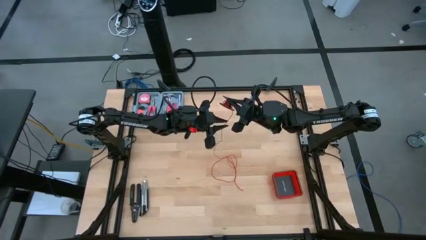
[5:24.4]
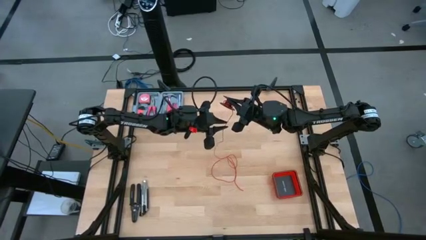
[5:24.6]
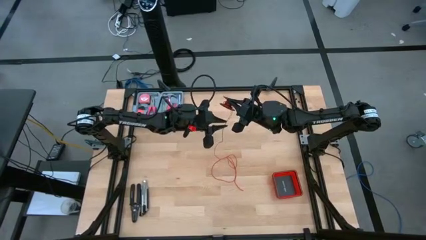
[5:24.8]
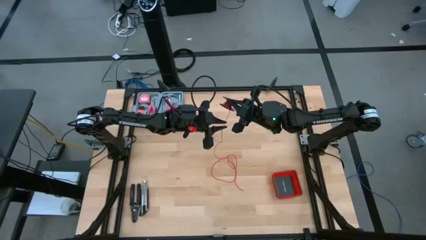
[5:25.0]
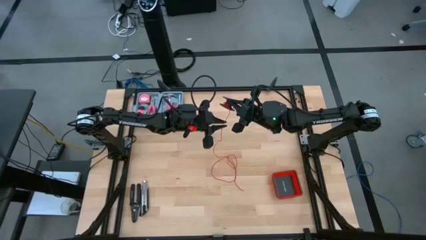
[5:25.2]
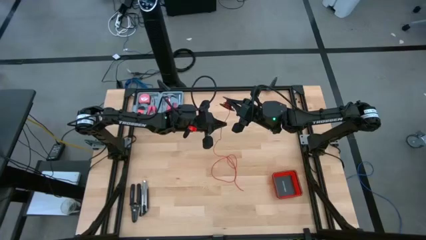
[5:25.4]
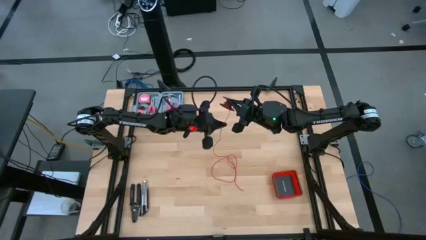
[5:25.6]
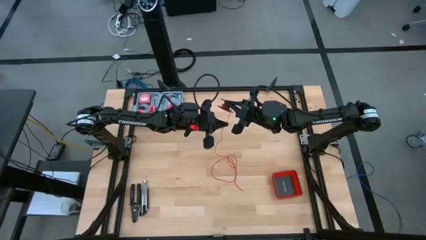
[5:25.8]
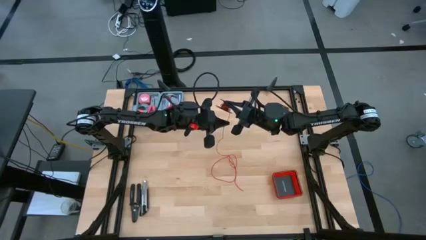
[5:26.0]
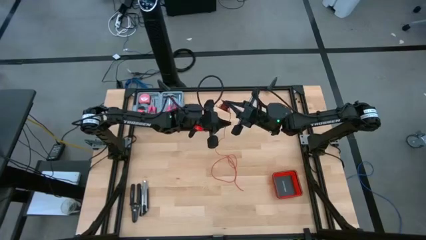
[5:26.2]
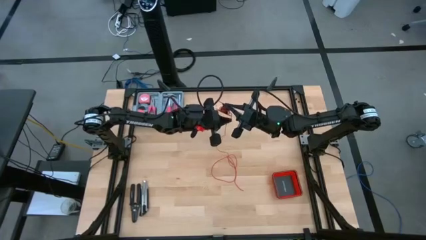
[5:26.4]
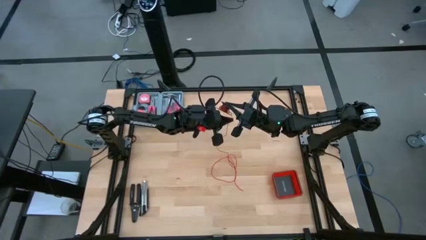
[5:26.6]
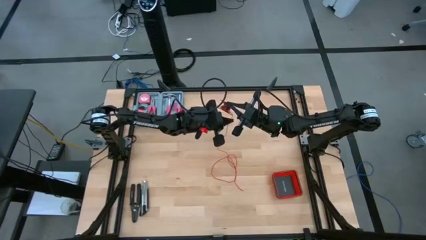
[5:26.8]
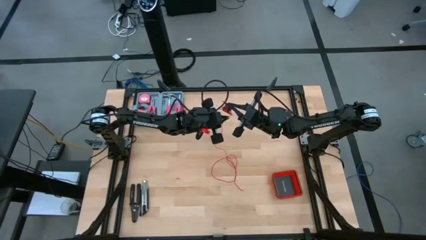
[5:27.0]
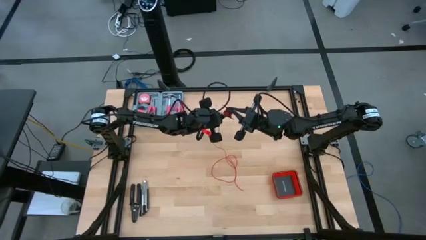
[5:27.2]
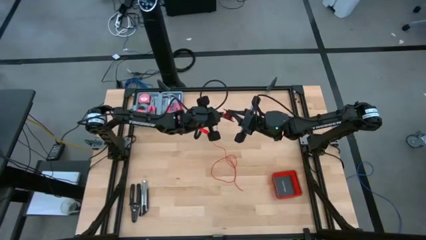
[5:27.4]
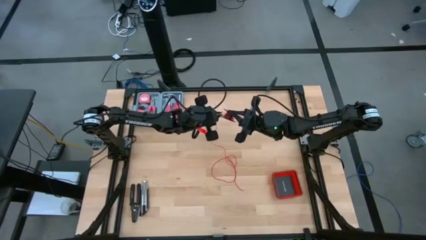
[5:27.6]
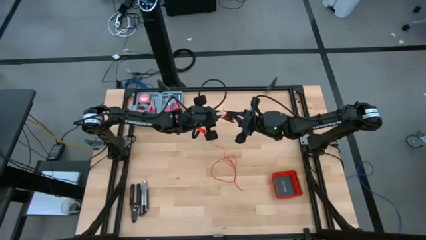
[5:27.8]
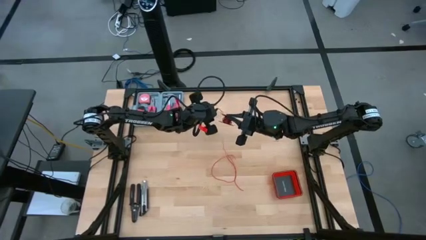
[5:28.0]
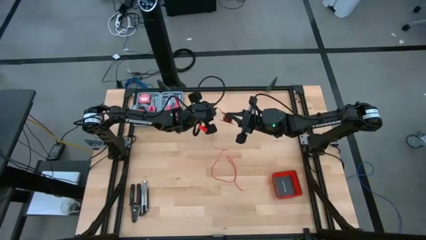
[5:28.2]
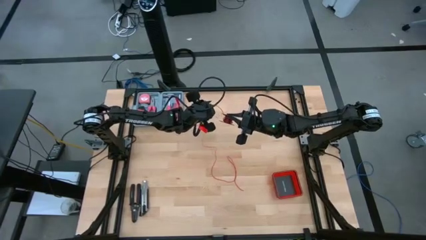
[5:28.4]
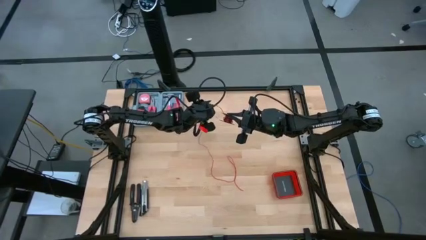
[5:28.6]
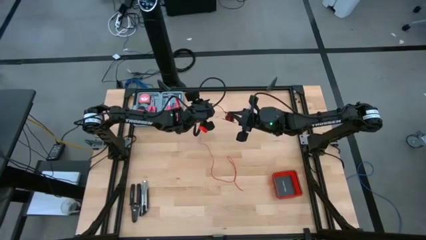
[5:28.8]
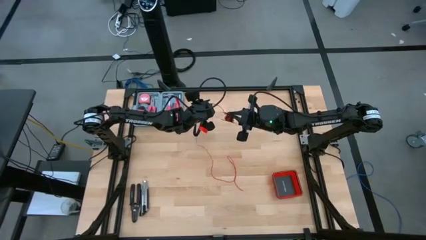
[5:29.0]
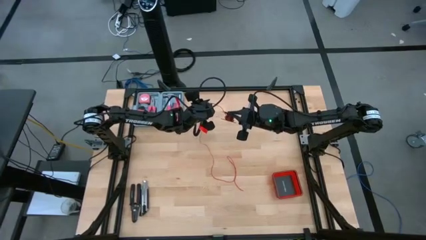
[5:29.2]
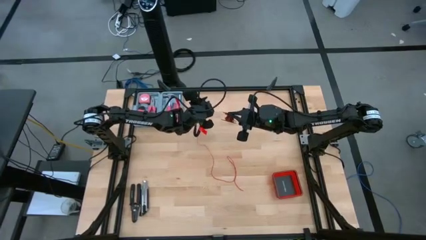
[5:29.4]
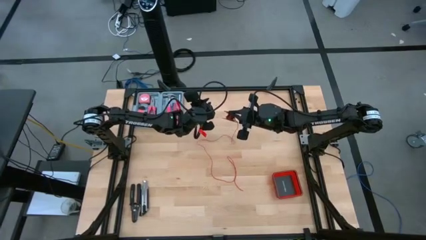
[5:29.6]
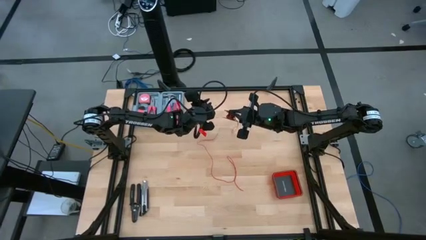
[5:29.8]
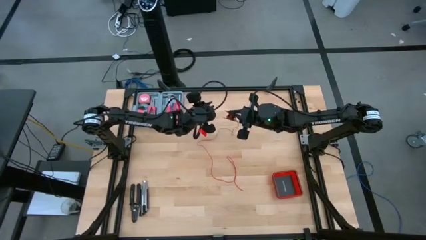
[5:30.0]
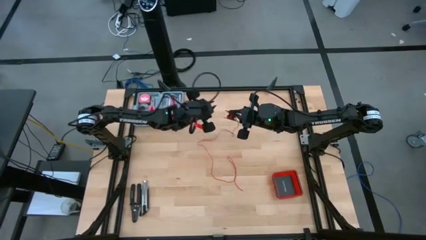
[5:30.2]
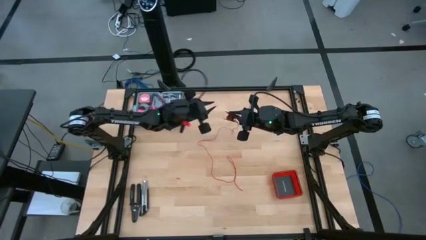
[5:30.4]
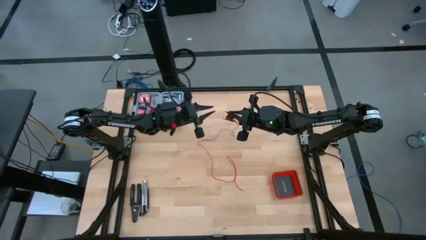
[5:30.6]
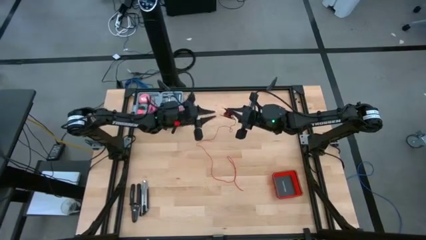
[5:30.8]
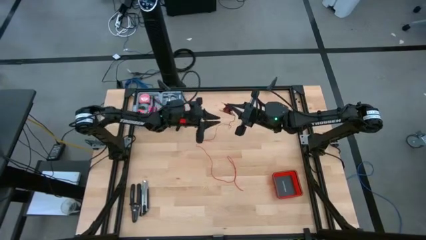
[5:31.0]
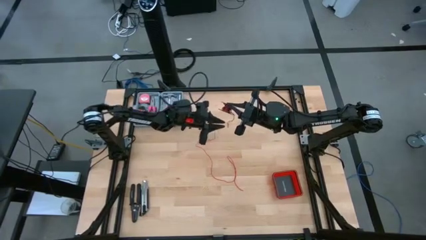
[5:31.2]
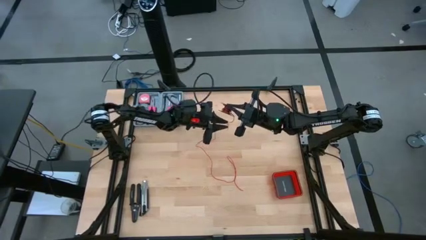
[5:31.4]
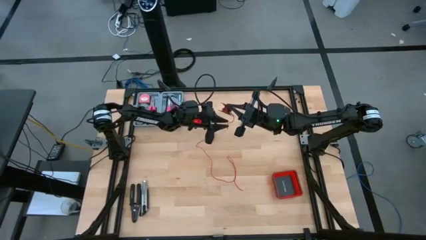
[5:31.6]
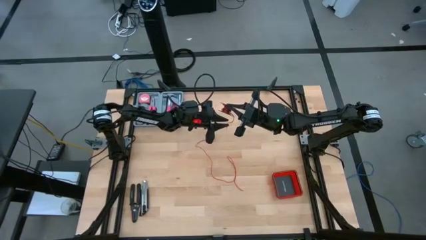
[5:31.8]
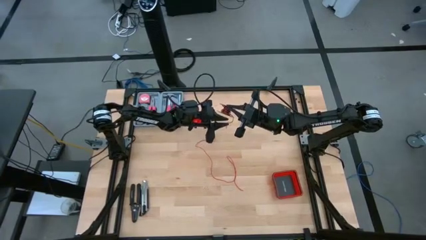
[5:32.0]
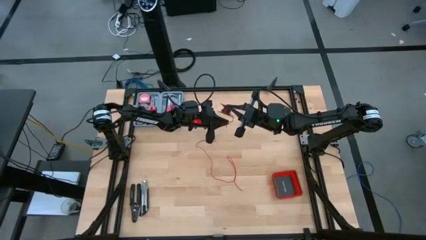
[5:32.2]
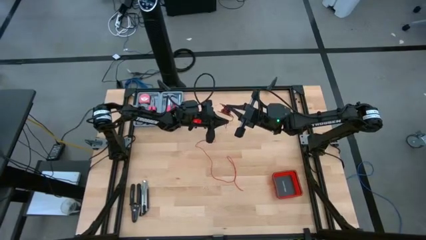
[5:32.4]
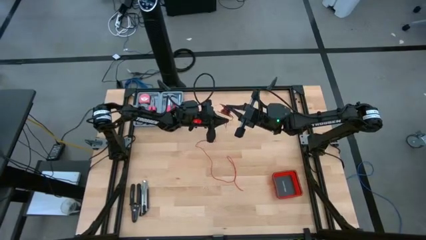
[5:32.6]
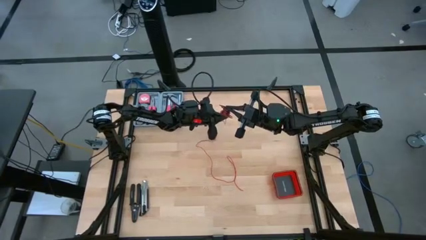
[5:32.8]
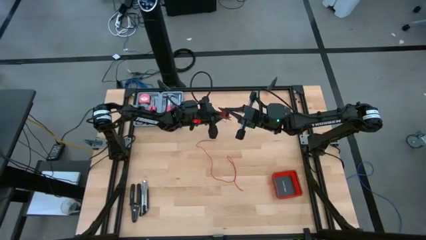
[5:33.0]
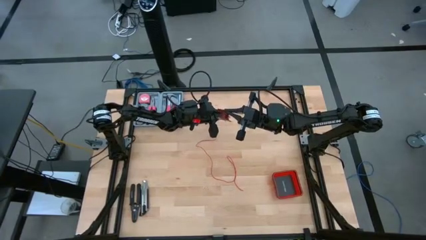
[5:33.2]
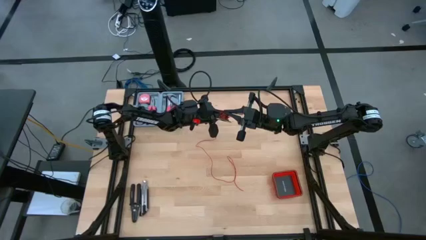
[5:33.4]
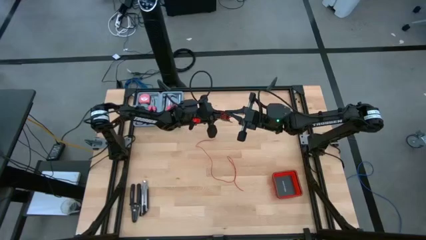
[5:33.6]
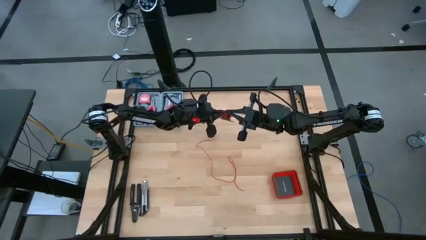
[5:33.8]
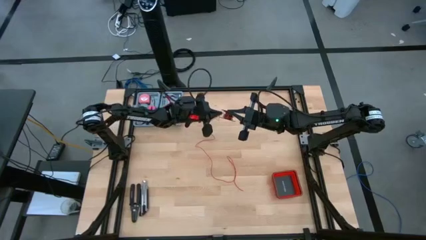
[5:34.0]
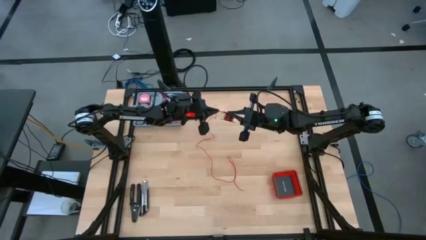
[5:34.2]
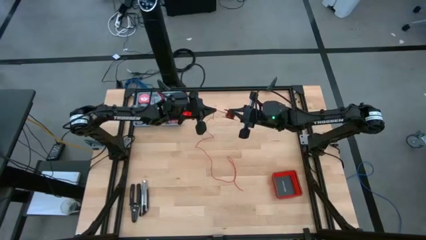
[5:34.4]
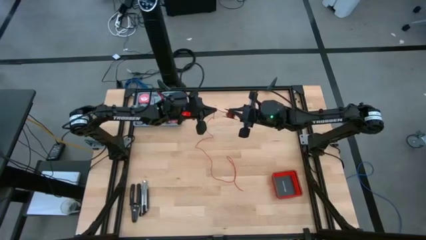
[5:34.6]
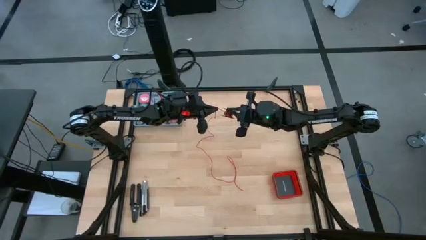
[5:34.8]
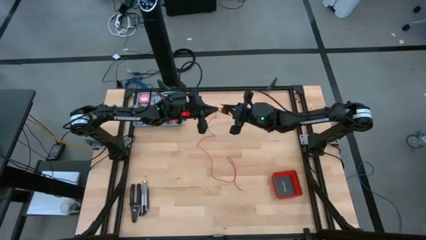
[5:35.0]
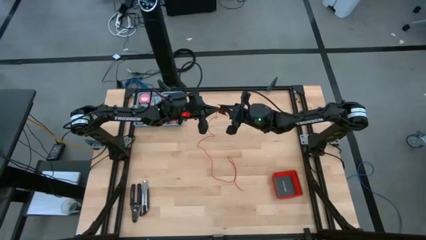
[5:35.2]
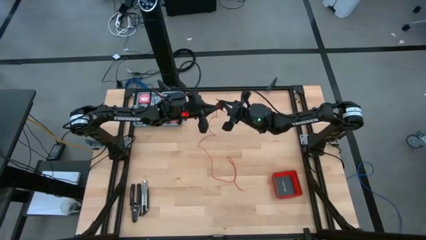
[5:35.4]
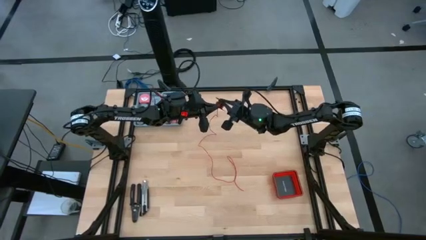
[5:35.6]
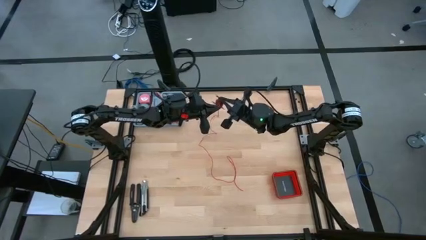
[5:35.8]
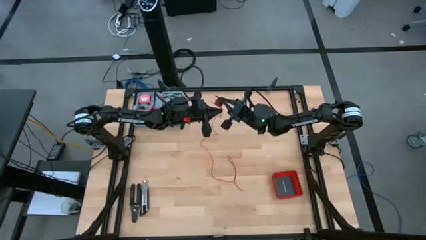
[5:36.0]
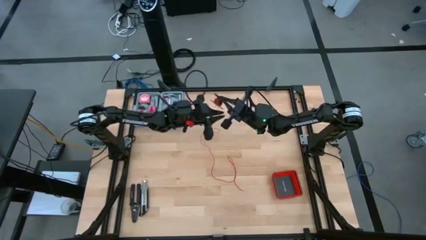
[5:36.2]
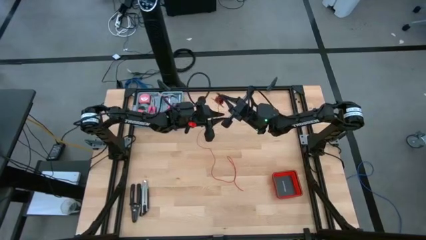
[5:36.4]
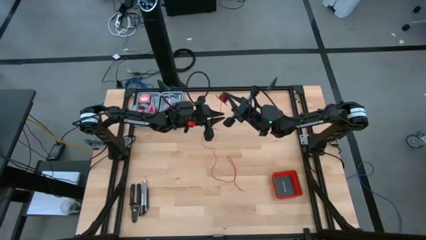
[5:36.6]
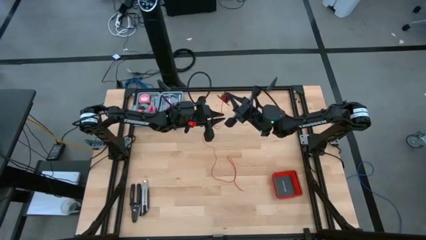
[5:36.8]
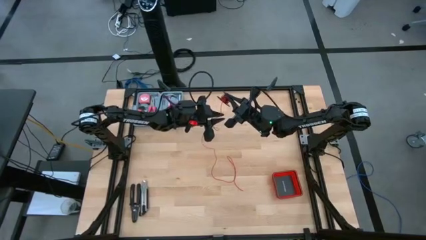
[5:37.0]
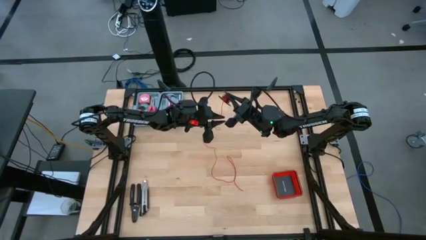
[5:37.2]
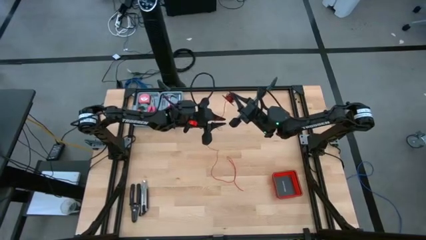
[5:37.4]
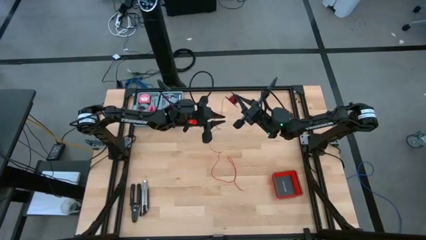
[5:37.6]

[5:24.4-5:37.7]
Task: Coil cords
Coil the red wire onto the spool

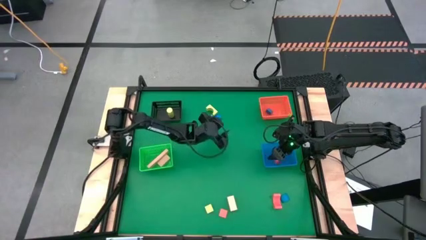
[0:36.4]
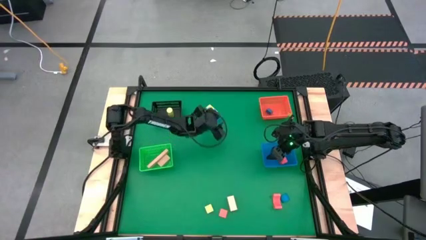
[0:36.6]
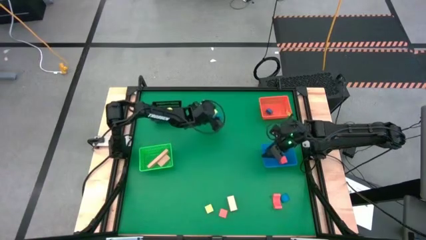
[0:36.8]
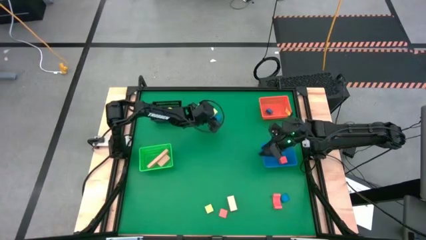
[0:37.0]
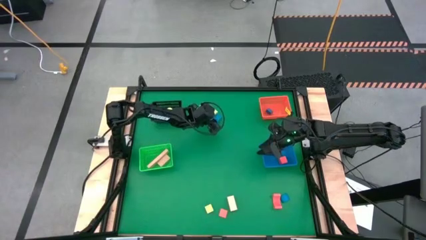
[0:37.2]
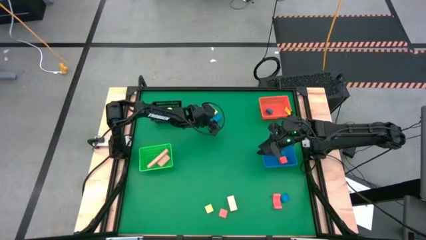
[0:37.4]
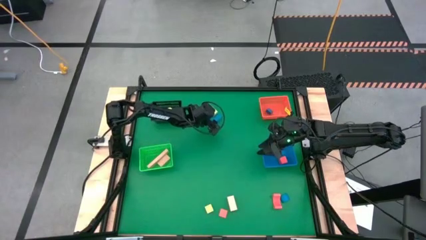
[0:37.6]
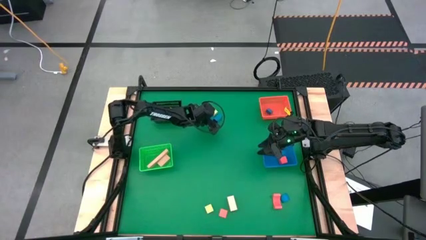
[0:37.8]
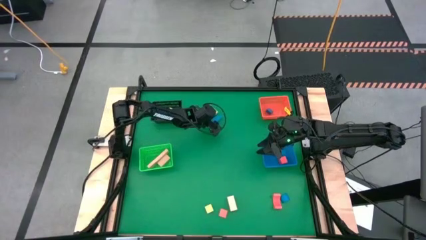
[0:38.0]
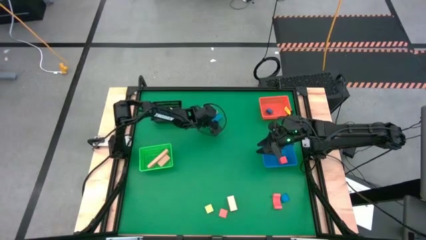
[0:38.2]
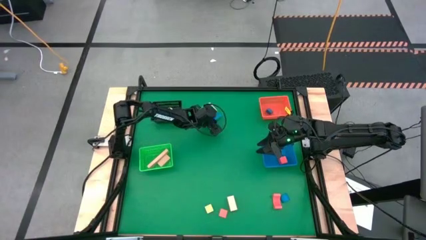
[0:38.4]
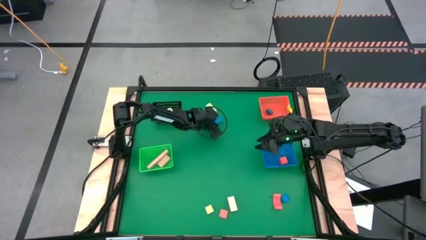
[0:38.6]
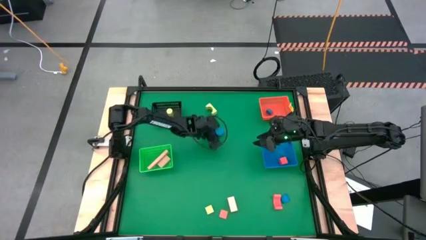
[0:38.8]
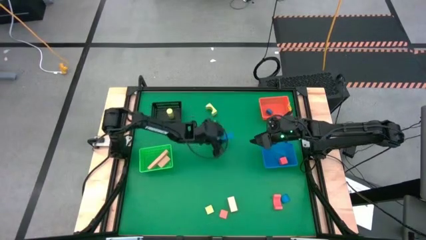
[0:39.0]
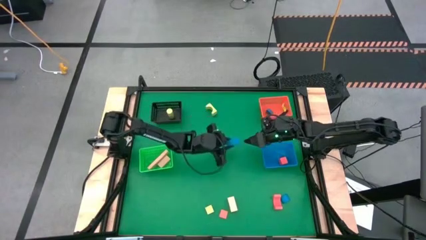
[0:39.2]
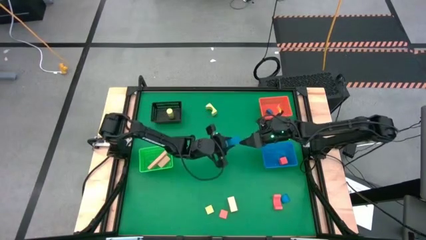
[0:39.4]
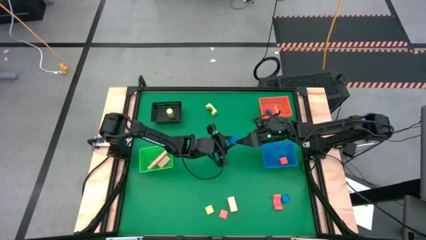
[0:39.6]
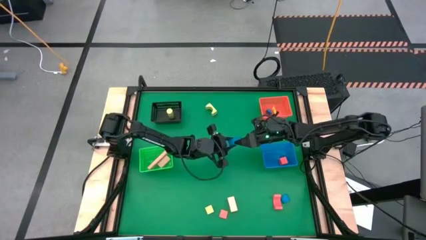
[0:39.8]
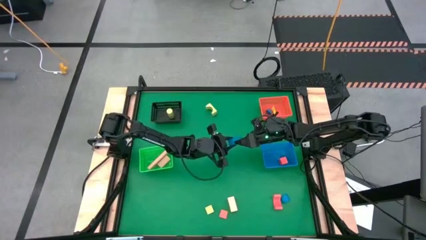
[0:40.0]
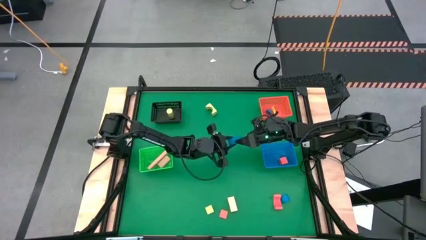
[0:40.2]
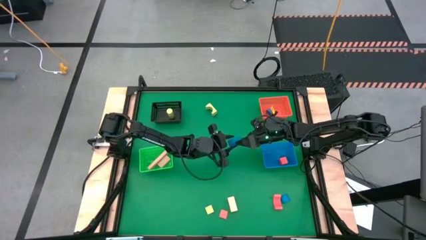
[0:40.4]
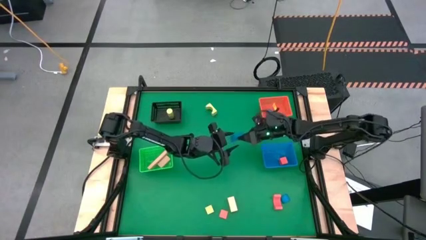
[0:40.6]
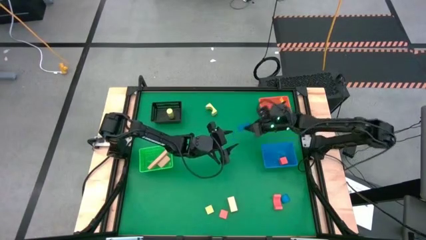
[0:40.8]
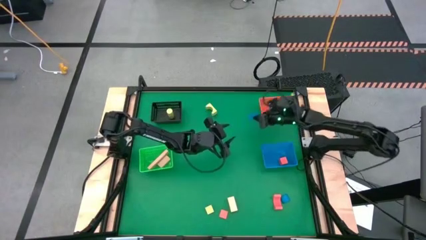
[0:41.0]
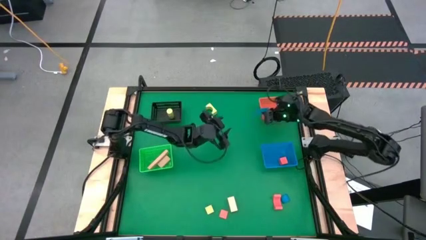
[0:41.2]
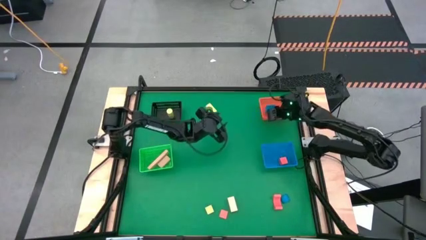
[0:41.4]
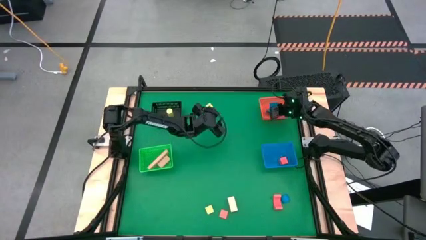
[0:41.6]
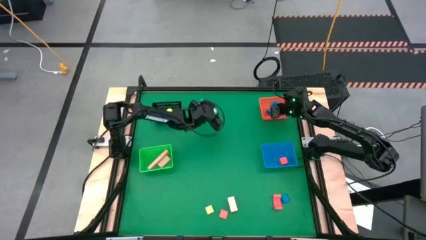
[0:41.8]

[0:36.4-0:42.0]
Task: Sort & place blocks by color
Put the blue block into the orange bin
